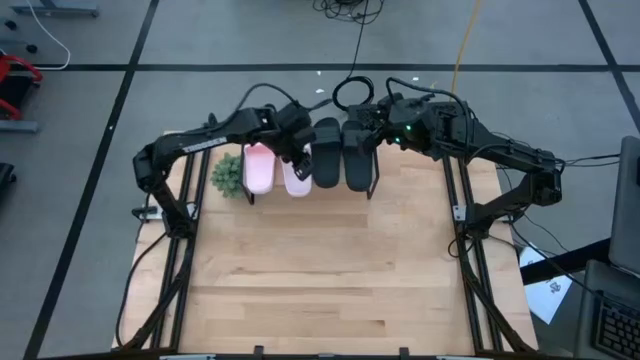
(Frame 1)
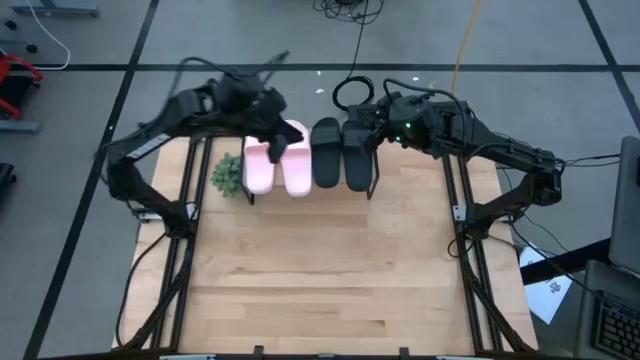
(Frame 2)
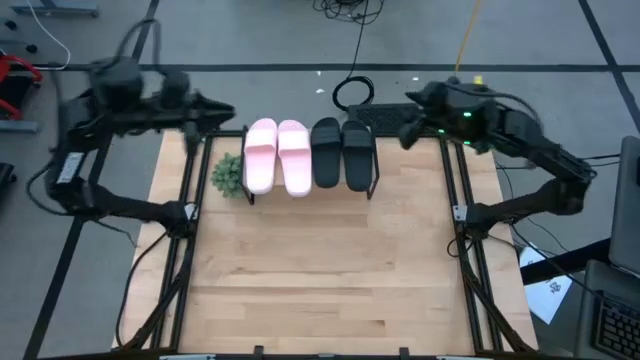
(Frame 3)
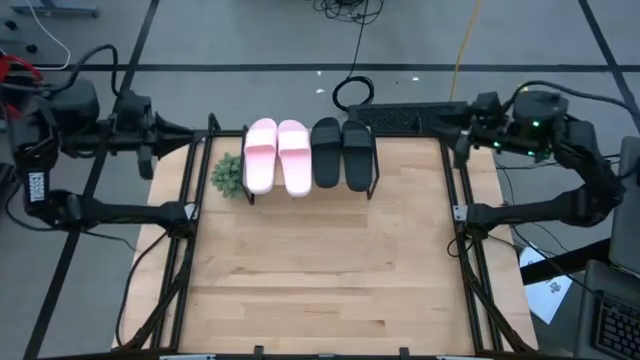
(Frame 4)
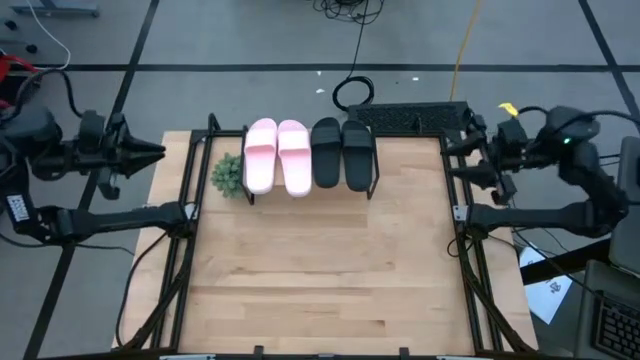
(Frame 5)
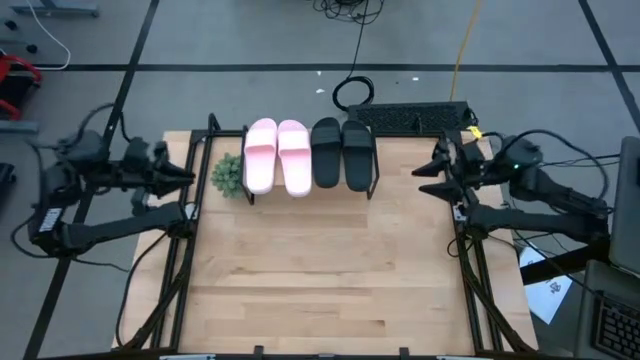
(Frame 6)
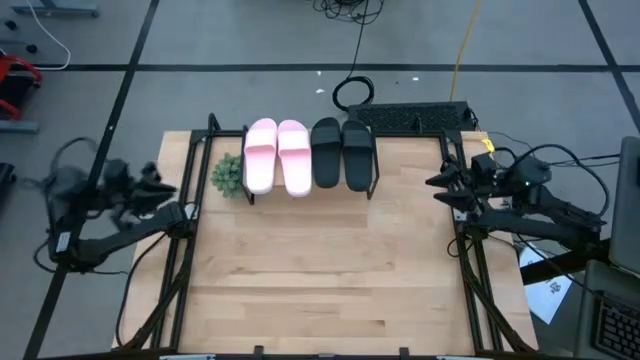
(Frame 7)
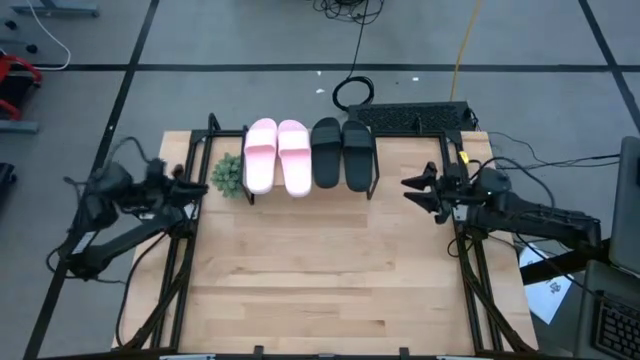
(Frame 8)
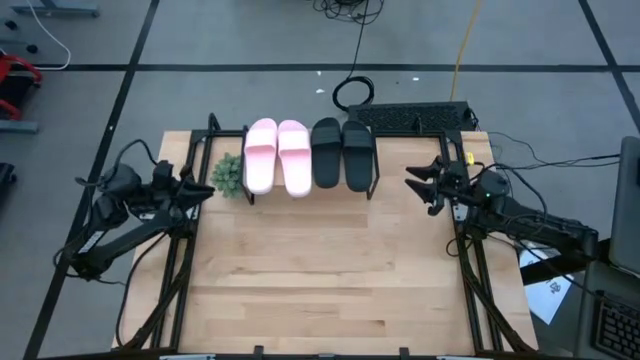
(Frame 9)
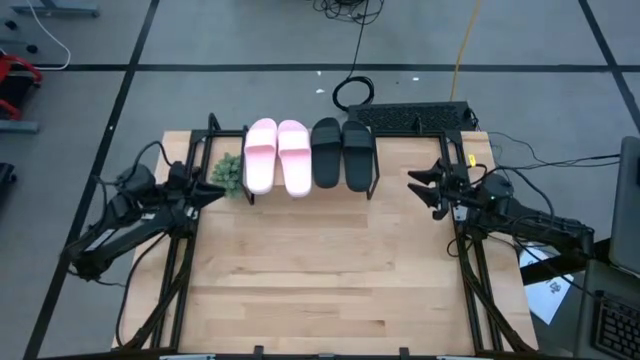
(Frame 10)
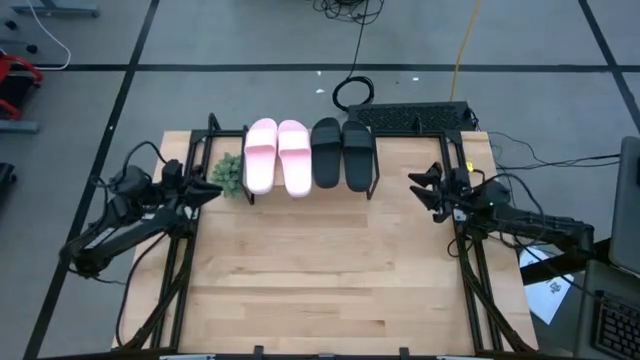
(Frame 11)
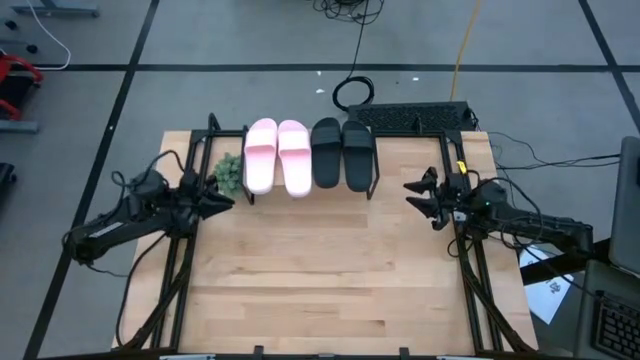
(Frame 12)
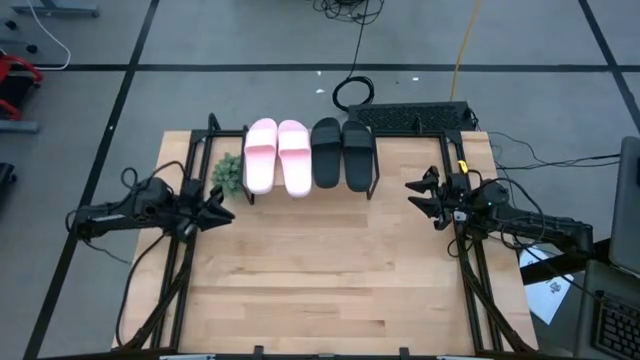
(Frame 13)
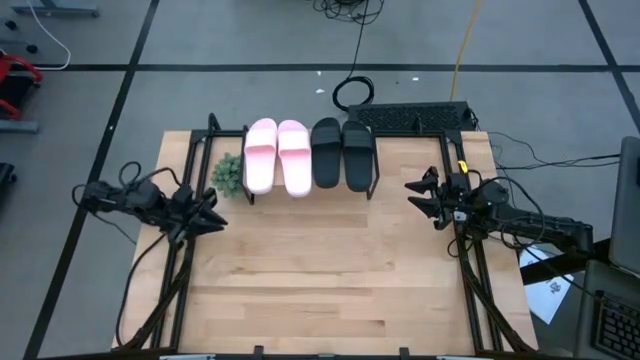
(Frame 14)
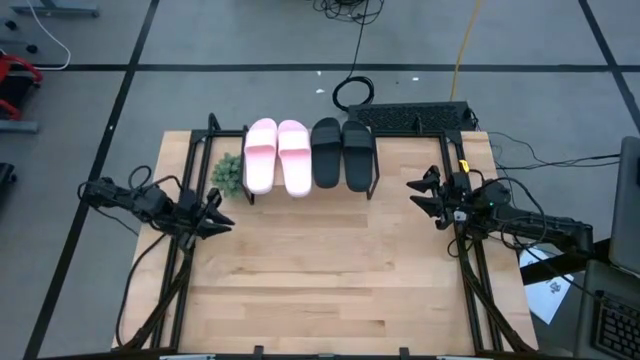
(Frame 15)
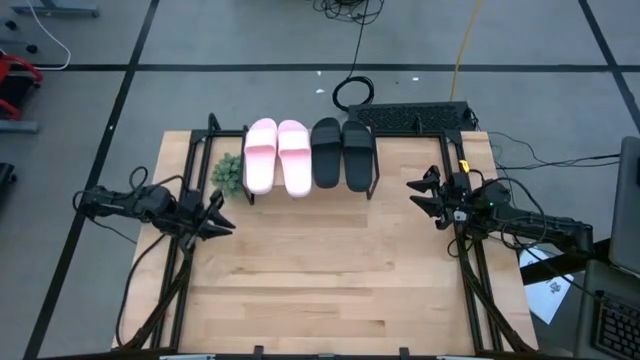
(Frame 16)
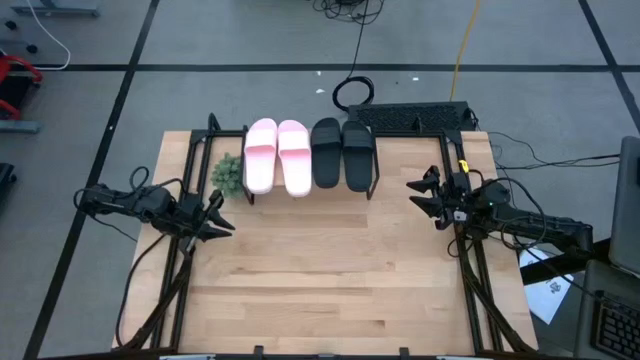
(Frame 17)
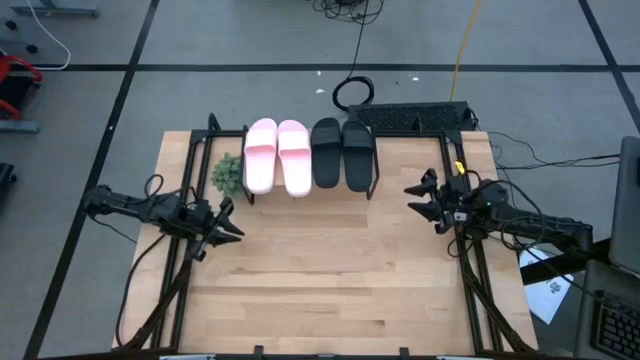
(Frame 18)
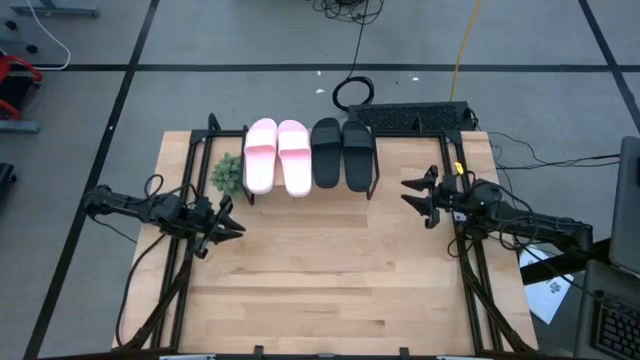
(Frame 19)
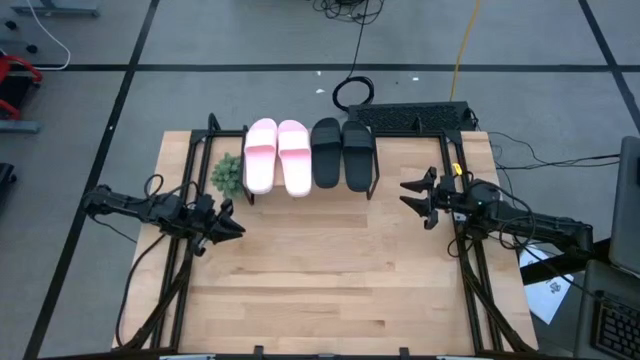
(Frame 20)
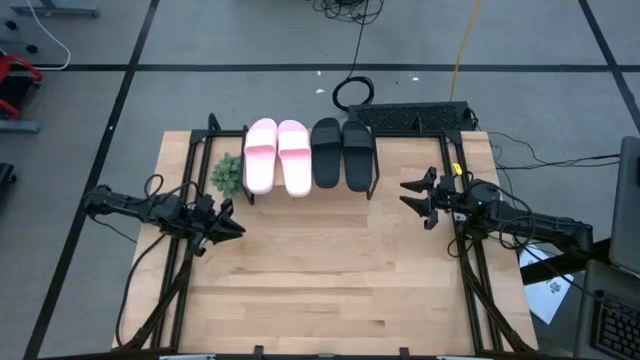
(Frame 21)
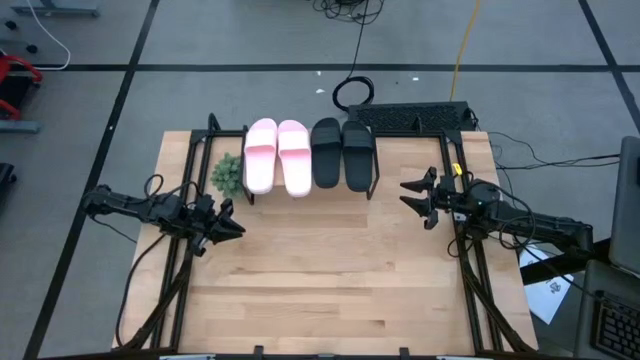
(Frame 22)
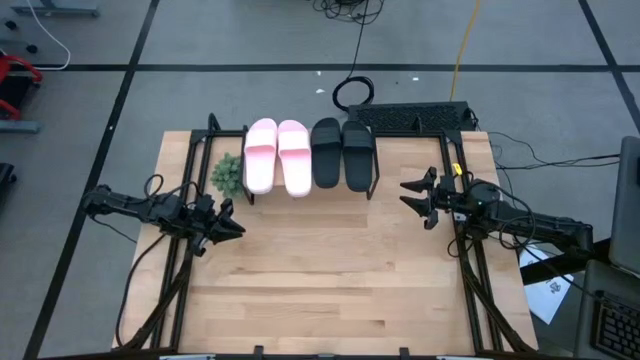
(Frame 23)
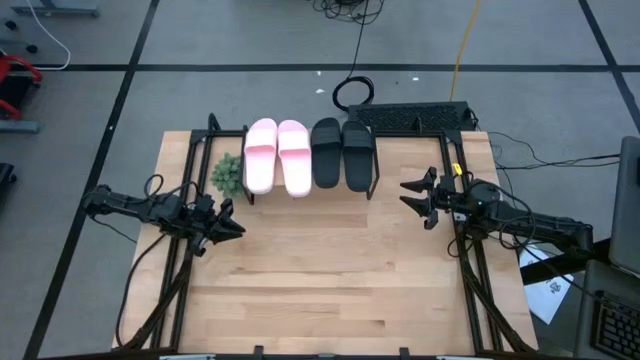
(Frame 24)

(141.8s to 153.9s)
Task: Pick and place slides into the shelf
Return to Home Position

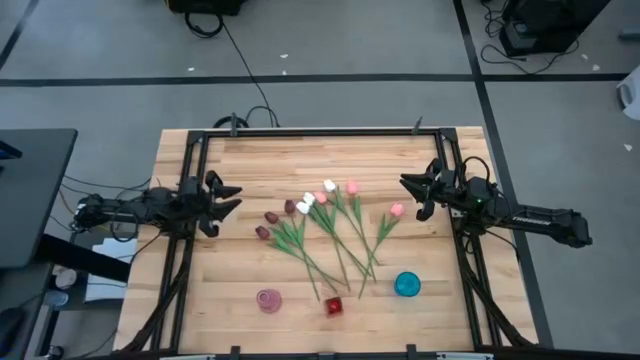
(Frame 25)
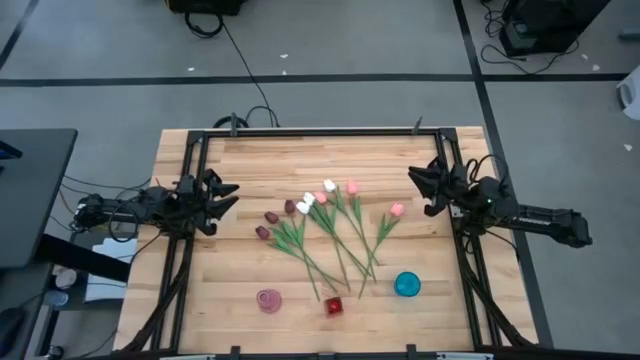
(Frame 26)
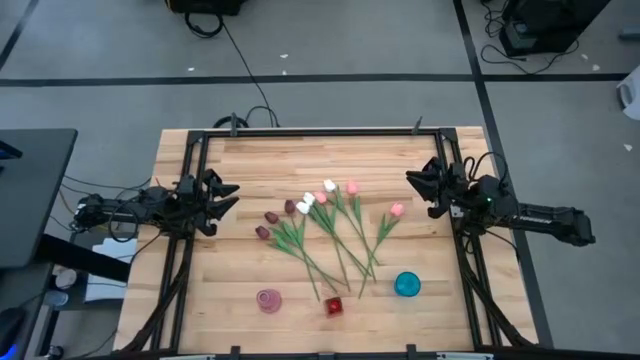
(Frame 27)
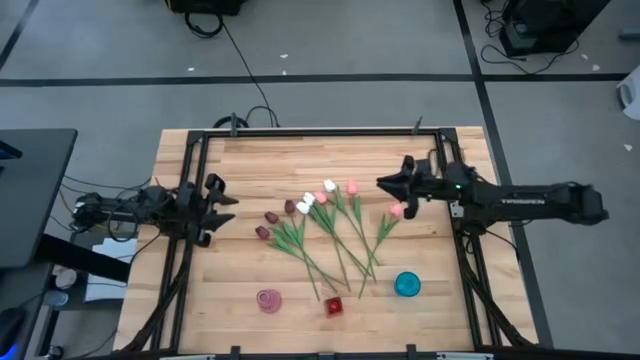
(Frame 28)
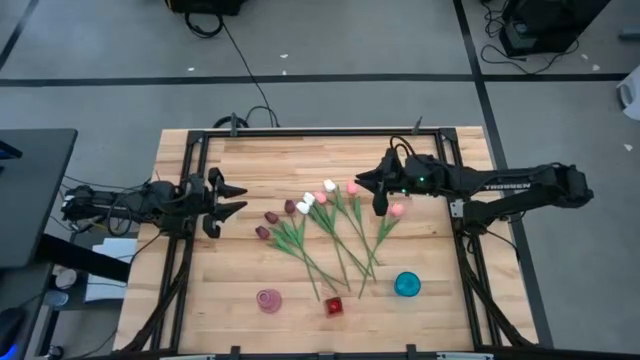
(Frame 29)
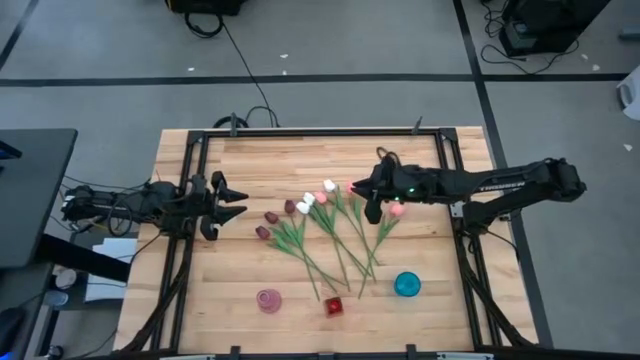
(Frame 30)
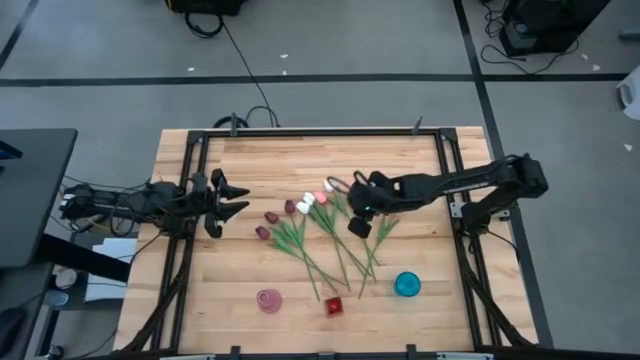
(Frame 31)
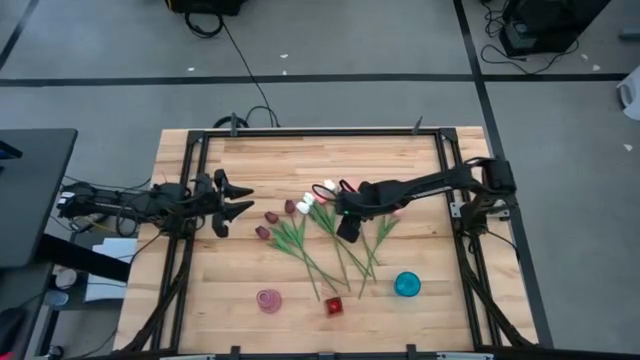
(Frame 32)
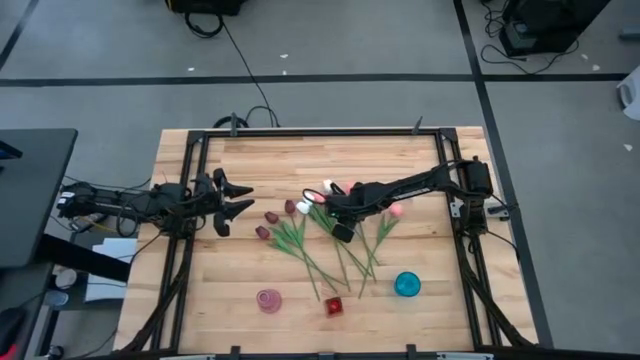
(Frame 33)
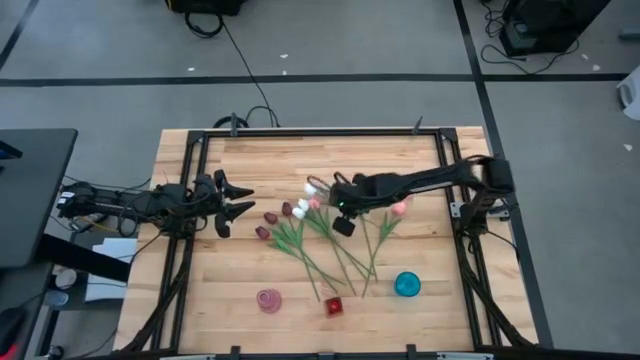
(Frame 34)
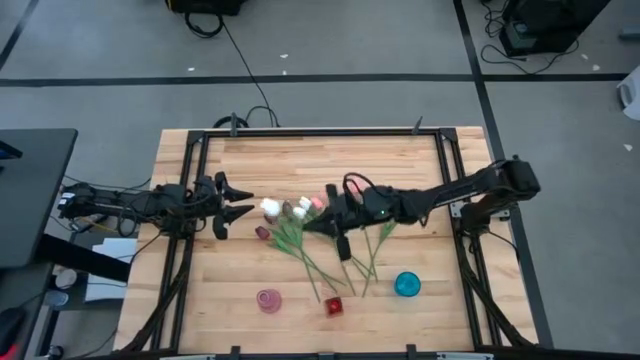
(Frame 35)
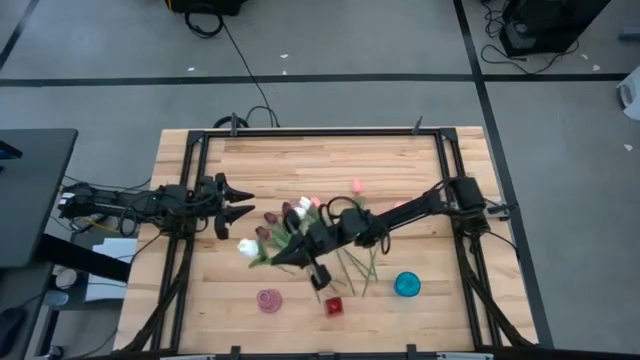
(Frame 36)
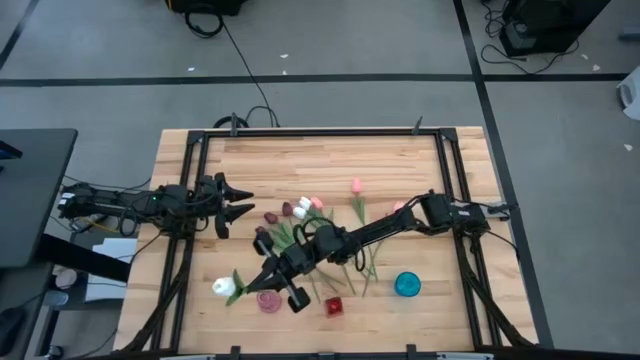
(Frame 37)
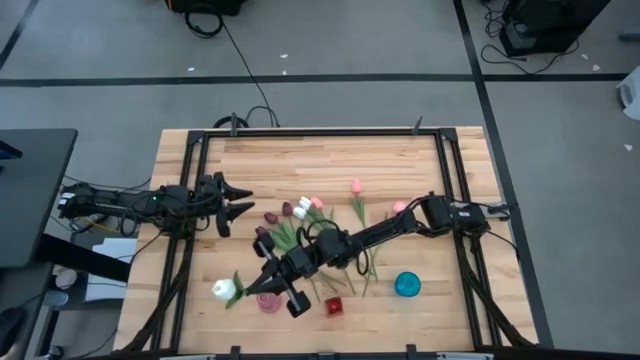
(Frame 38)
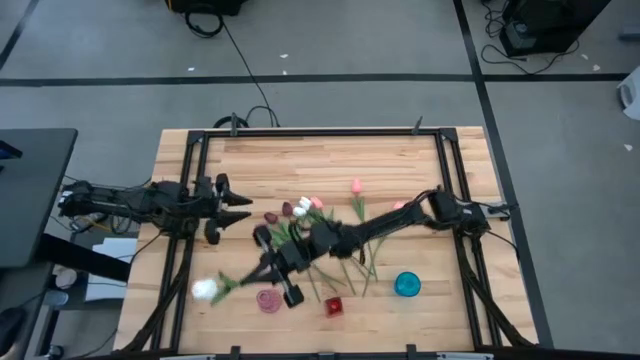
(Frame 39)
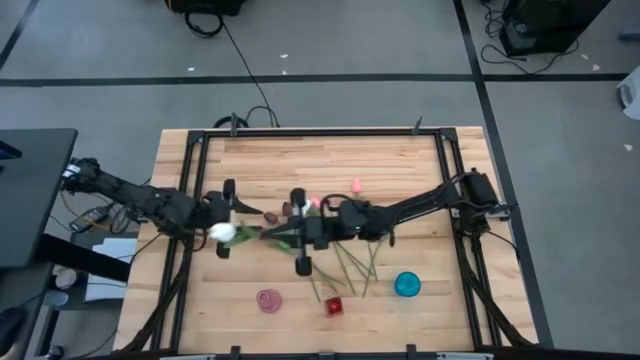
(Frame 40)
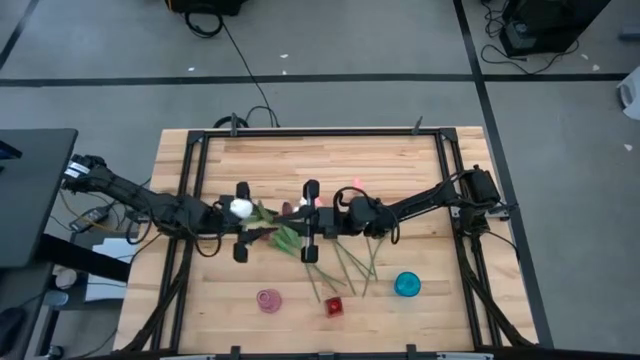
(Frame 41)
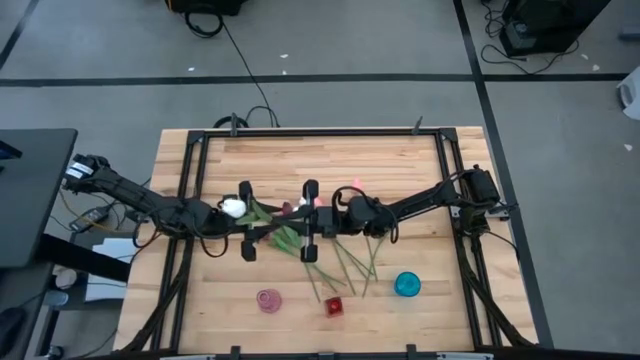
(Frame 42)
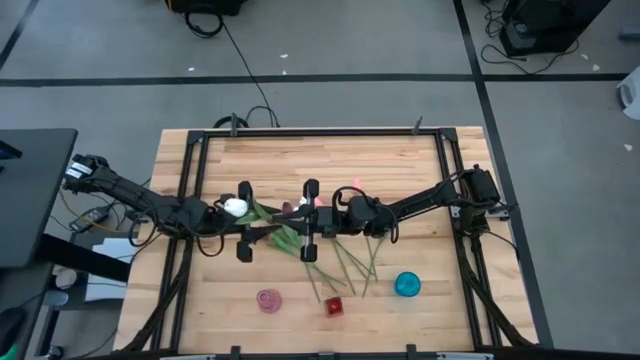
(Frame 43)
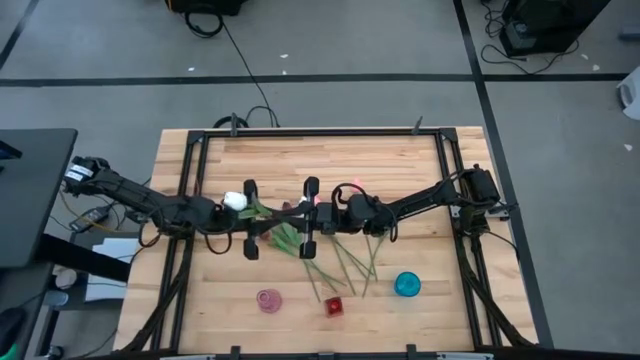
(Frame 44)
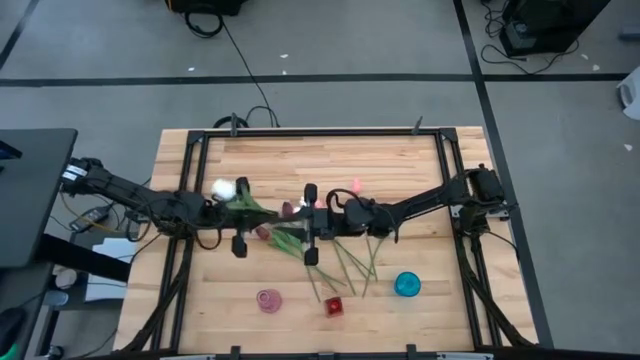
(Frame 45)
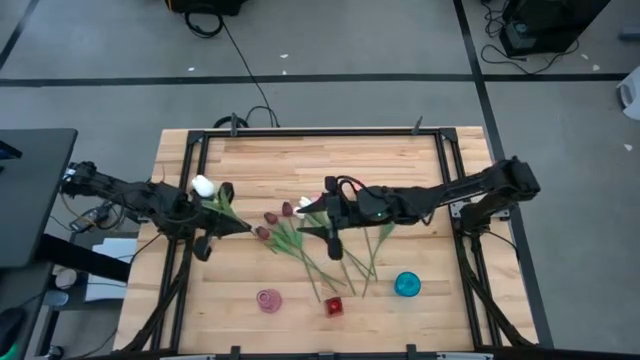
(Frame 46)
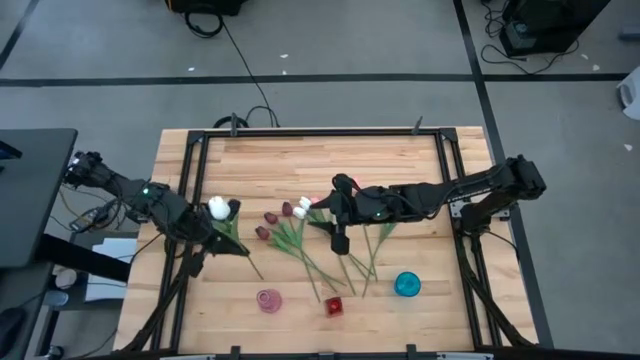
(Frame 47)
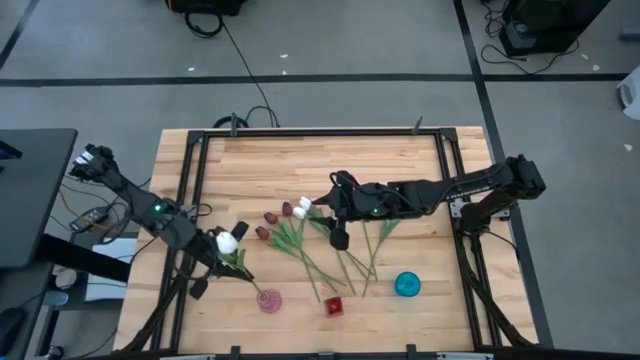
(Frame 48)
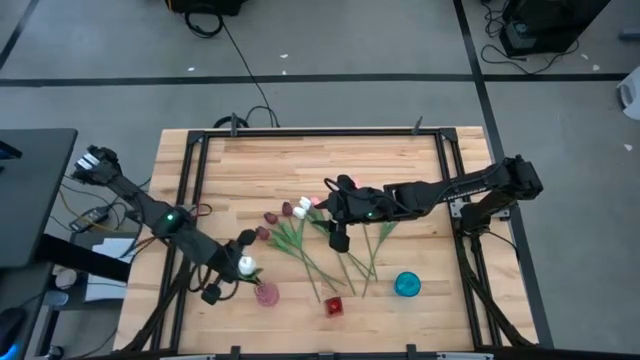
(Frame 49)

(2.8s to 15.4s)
Task: Sort flowers into vase by color
Put the right white flower into the pink vase
